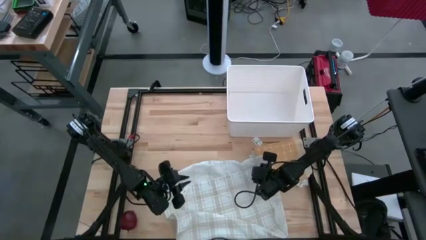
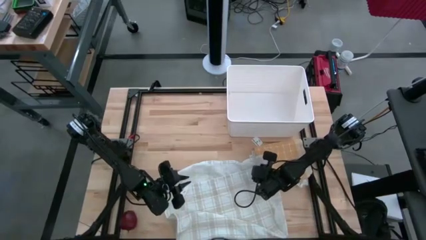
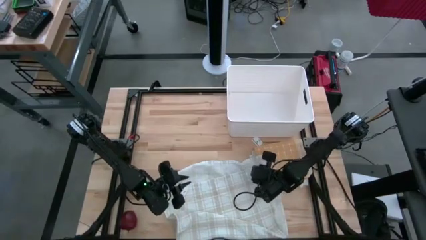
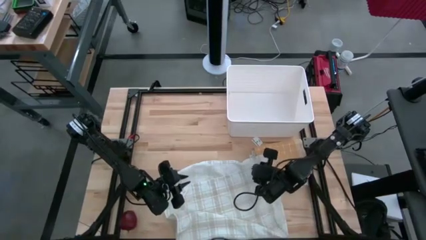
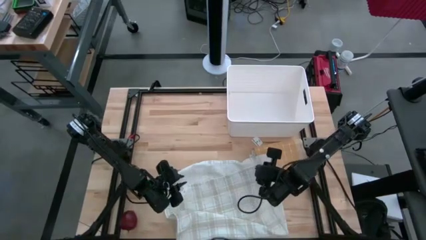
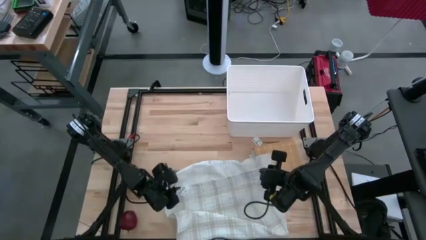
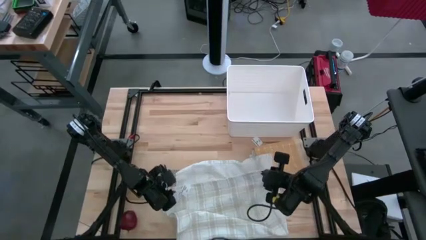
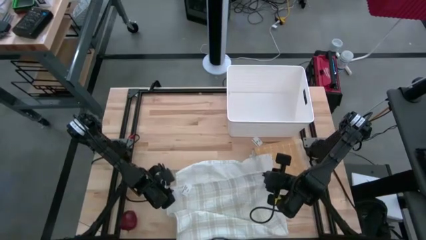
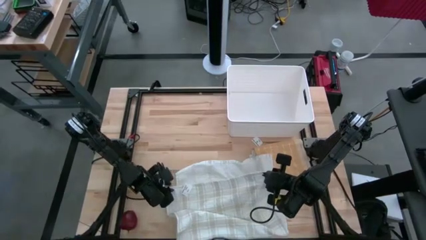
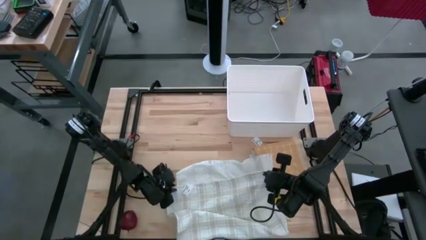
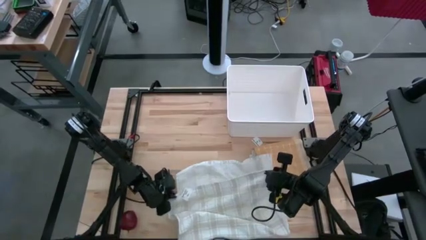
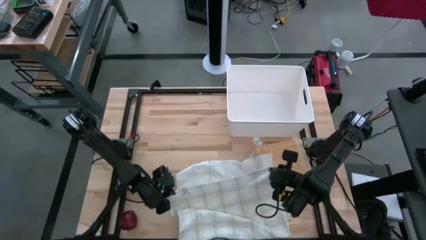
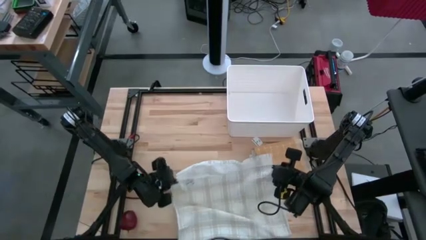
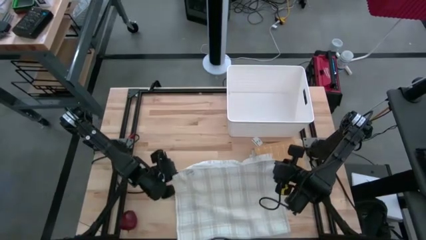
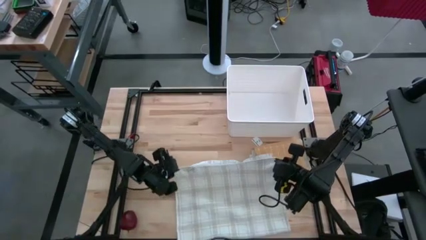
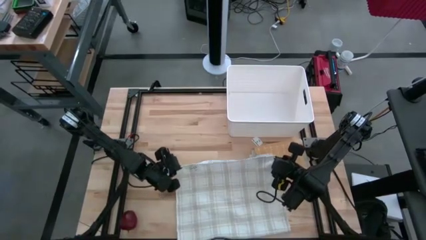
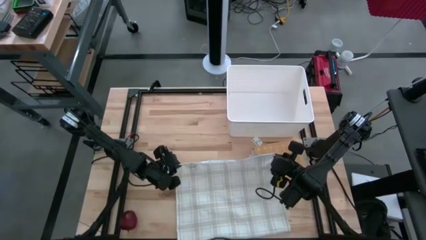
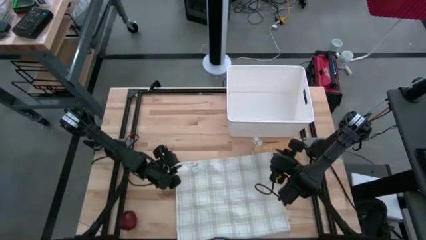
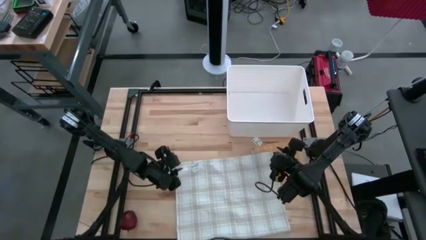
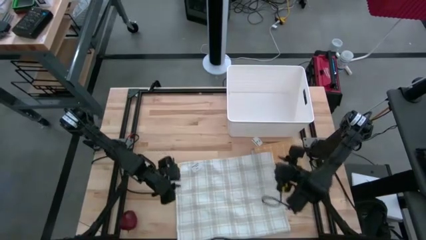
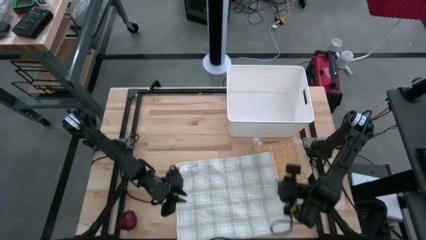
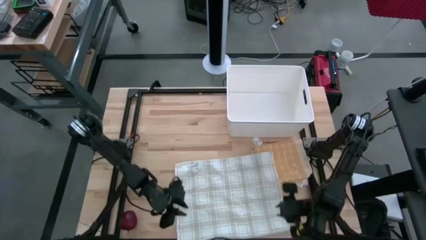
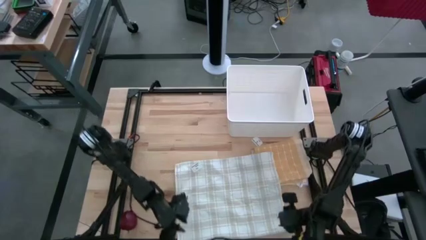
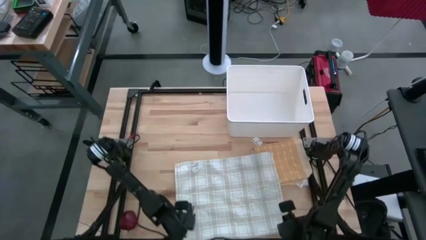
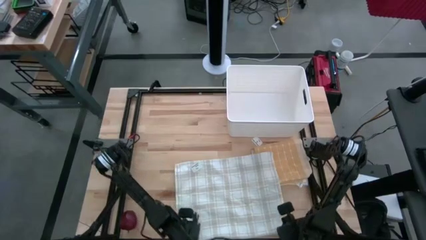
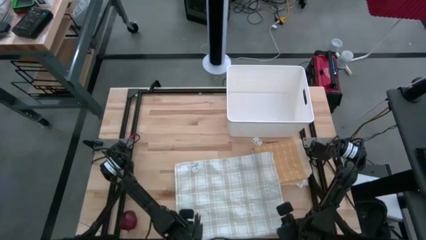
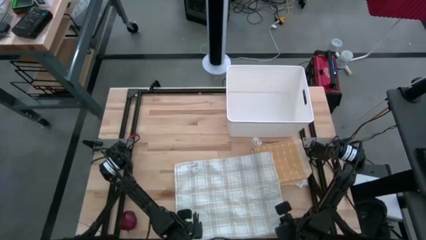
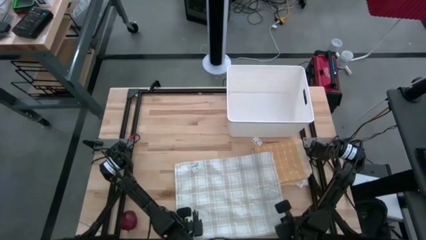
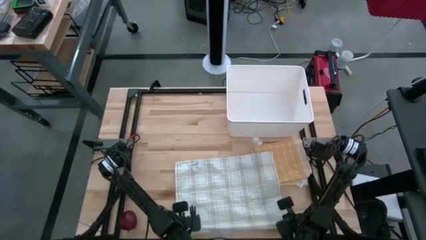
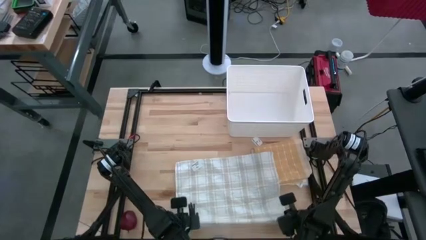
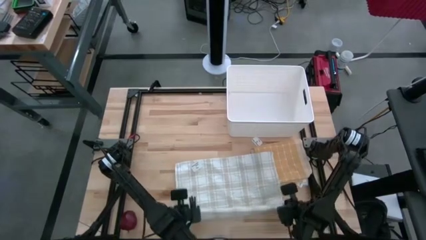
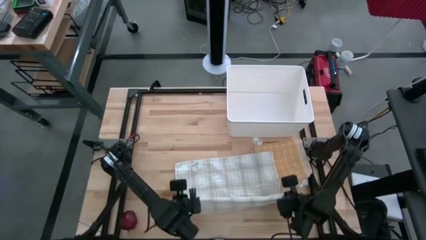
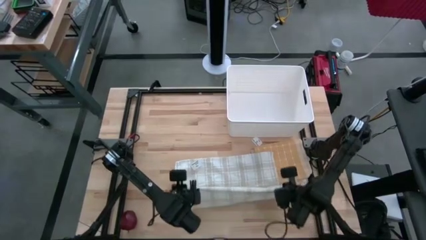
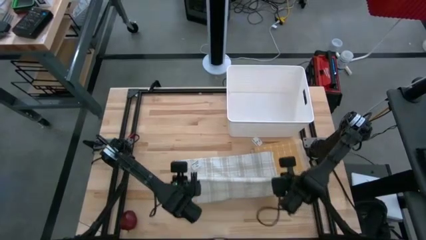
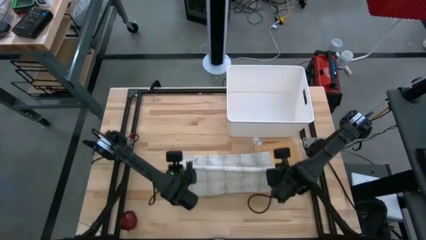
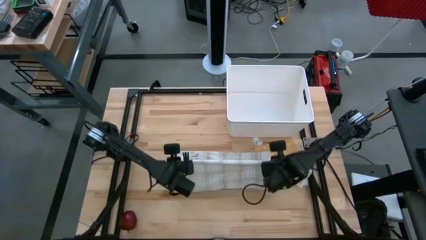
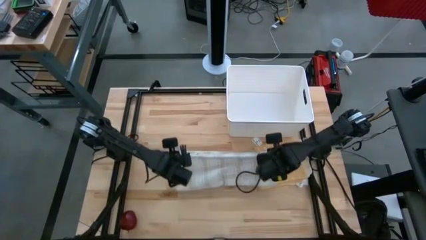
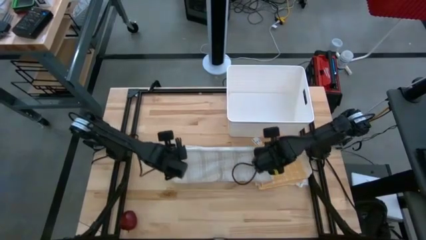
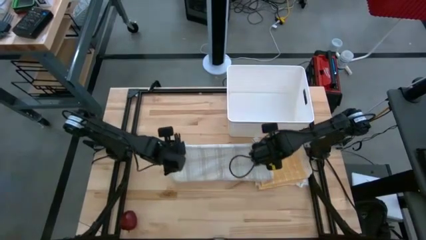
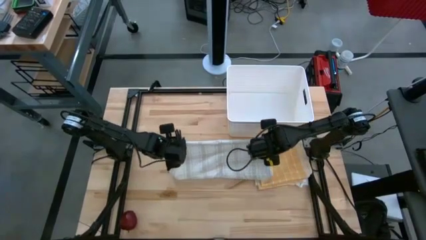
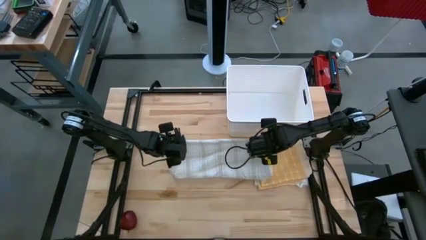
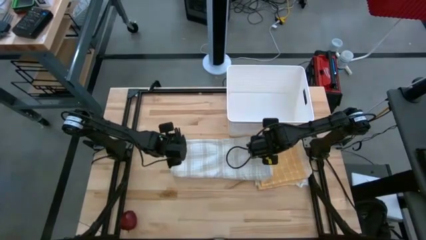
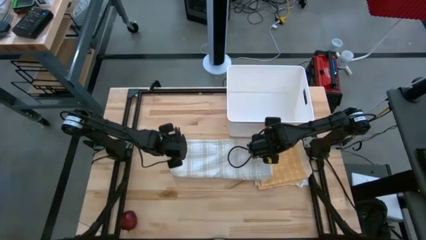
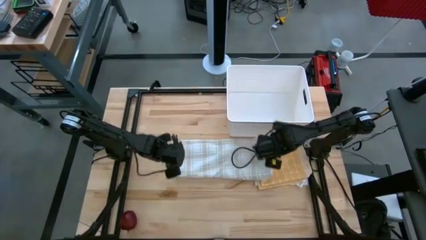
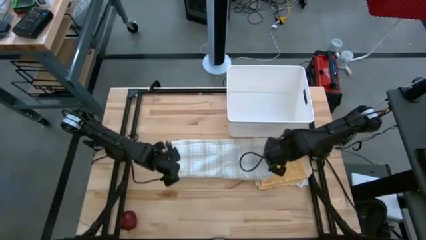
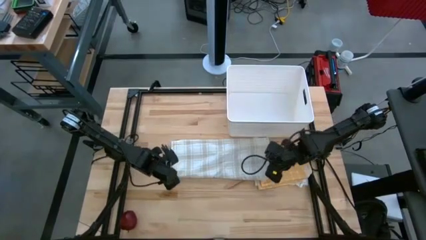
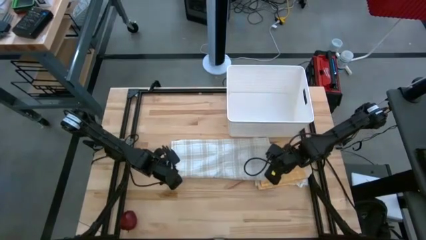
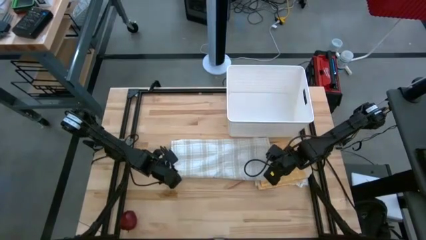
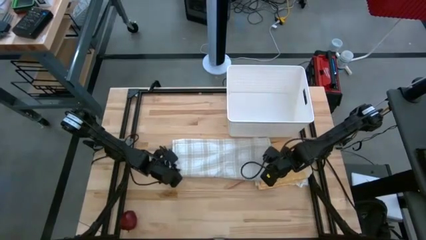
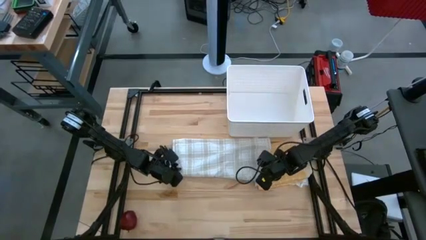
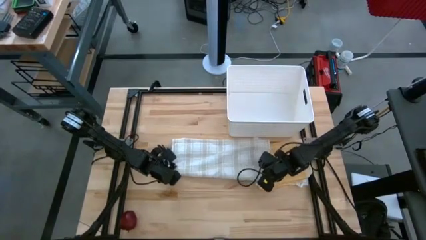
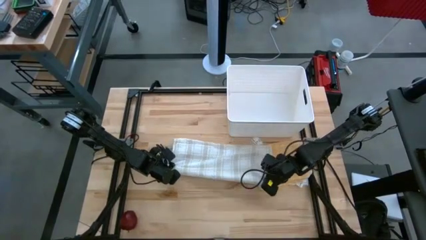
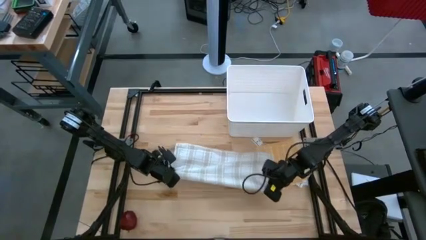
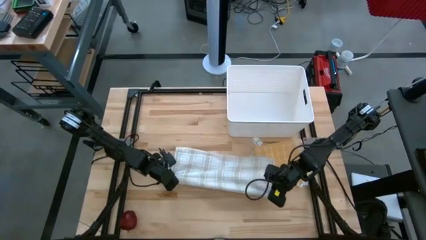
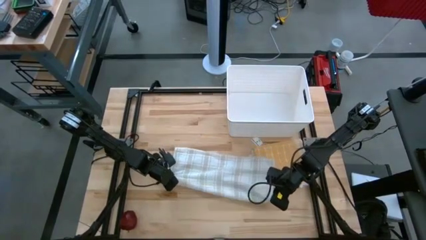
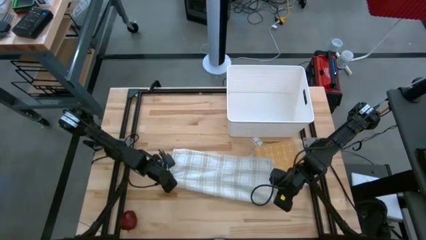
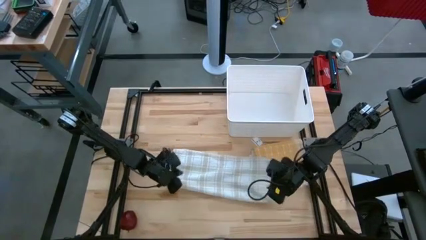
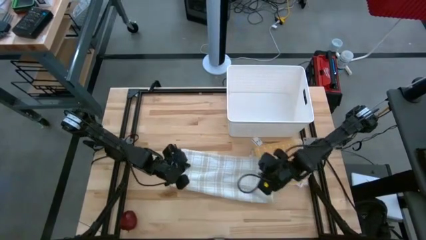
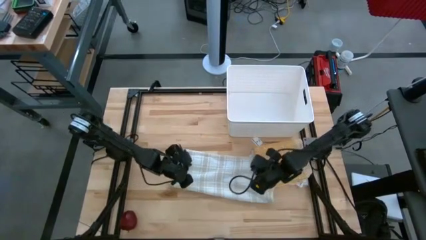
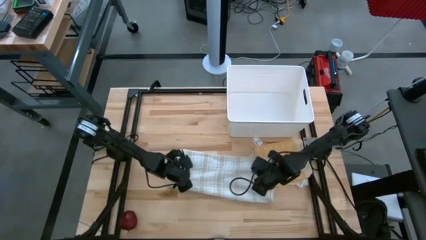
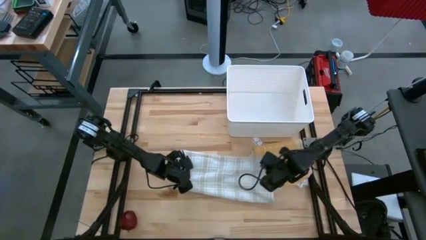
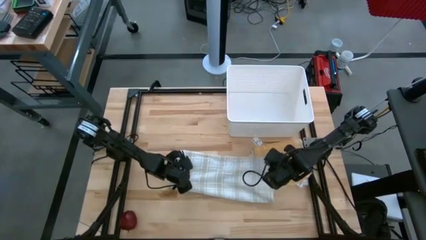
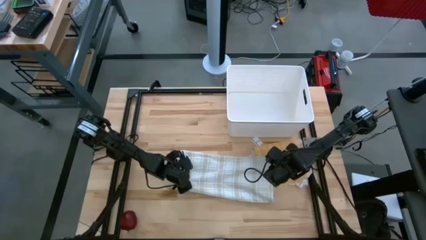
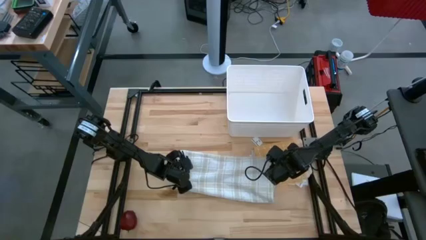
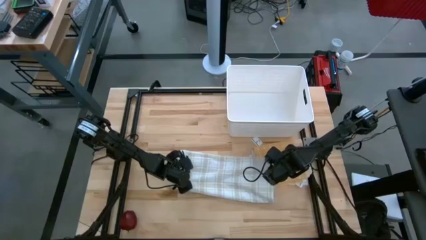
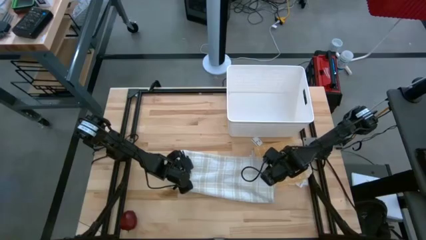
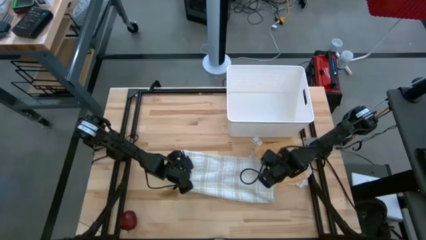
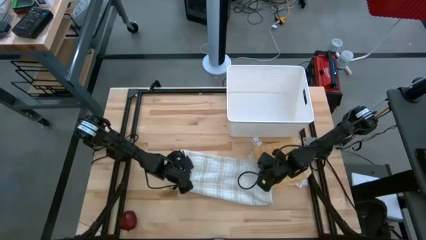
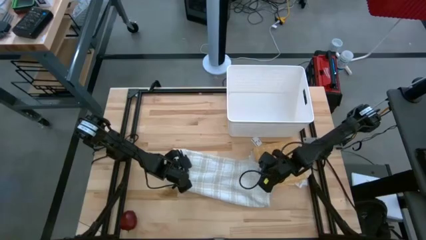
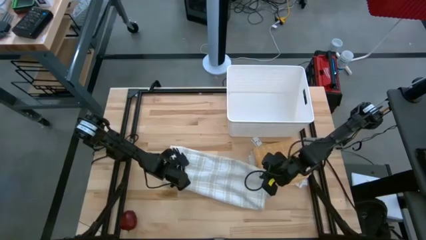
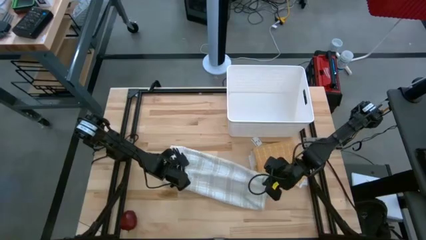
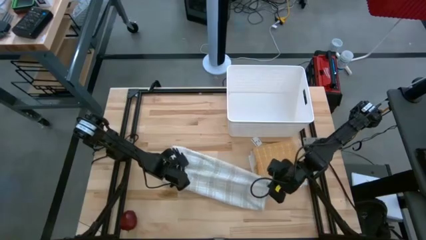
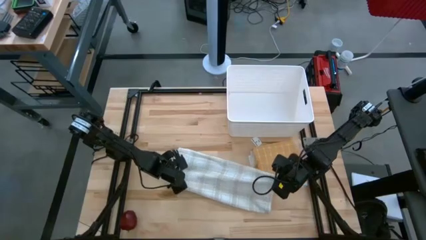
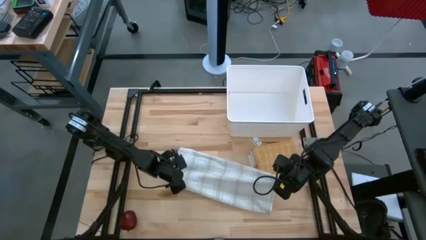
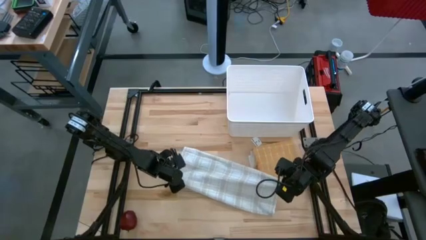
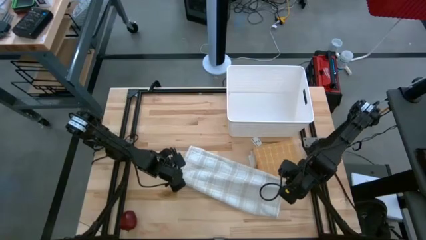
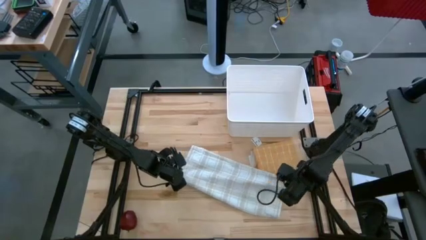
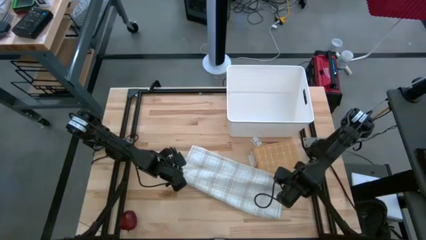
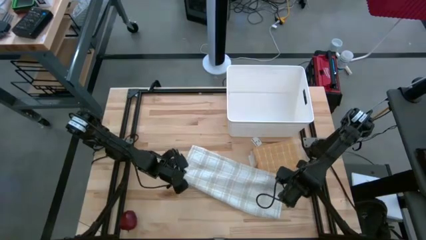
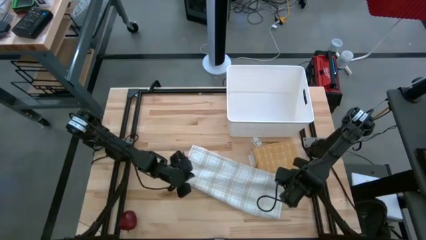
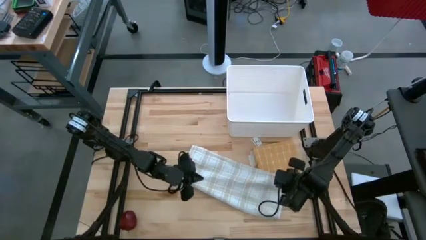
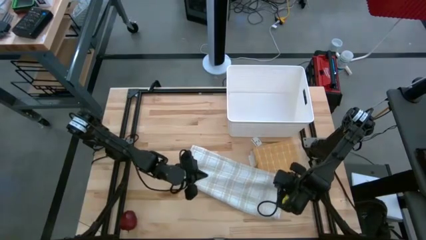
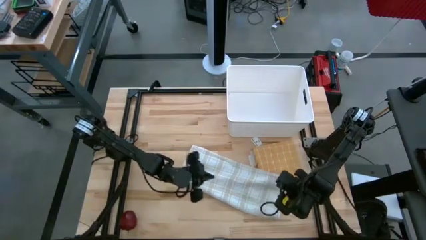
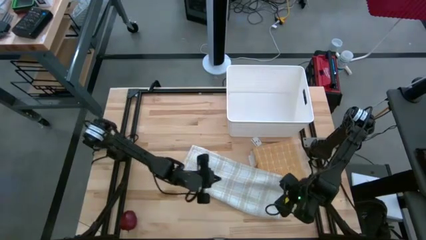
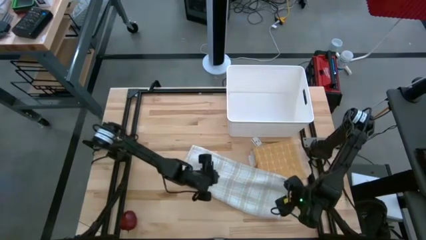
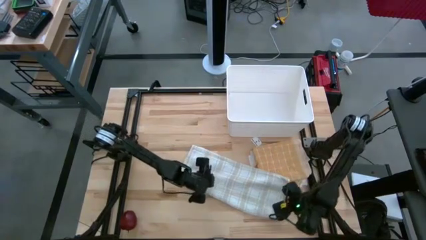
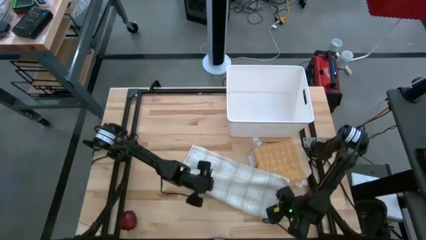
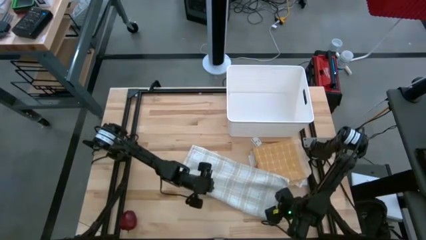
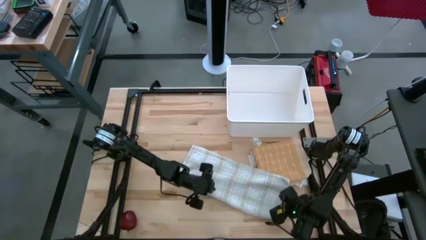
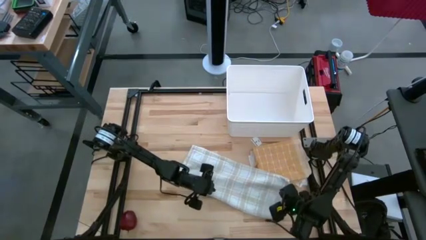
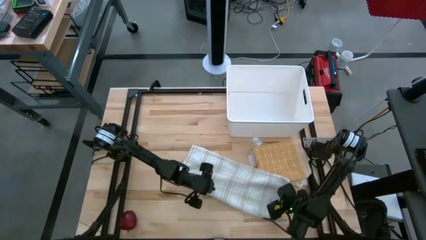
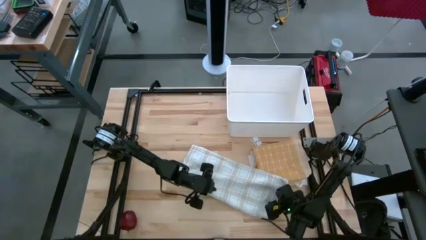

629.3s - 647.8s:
Task: Fold towel
Fold the white checkered towel
